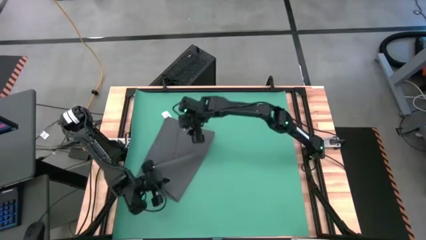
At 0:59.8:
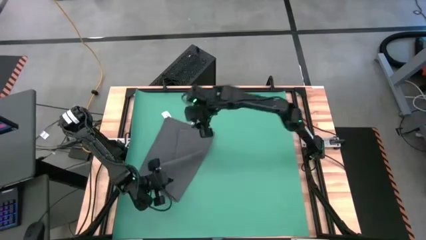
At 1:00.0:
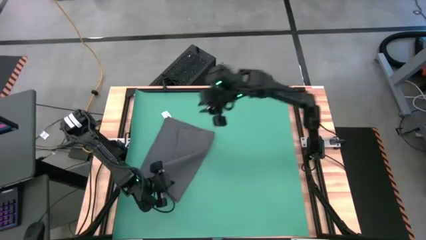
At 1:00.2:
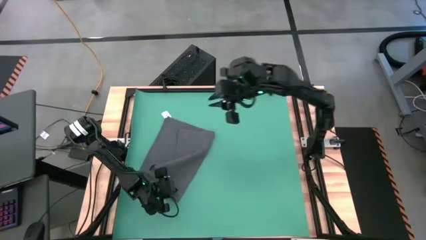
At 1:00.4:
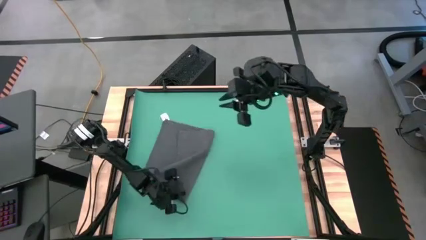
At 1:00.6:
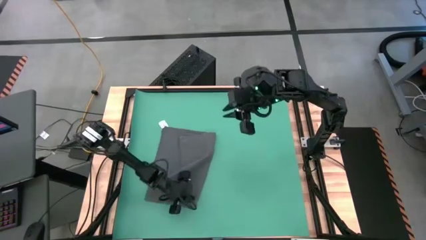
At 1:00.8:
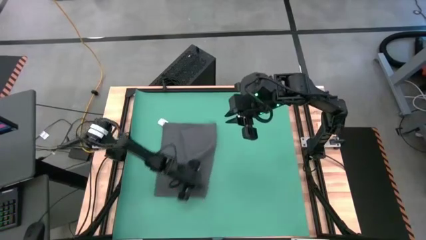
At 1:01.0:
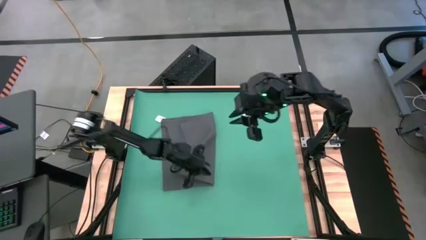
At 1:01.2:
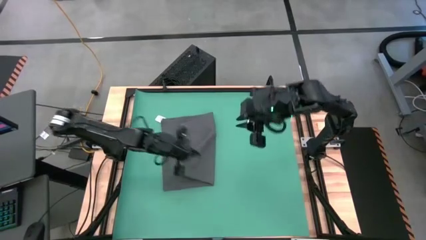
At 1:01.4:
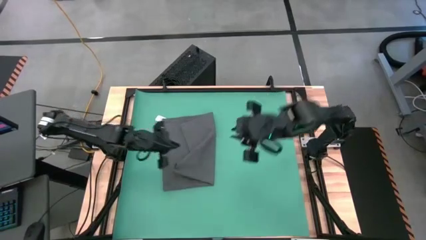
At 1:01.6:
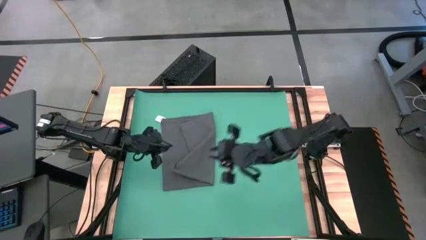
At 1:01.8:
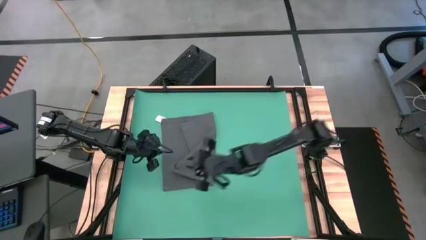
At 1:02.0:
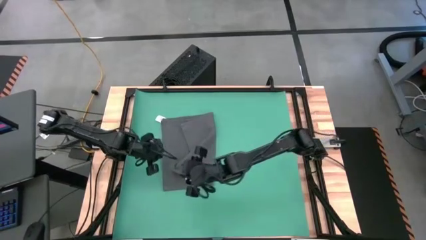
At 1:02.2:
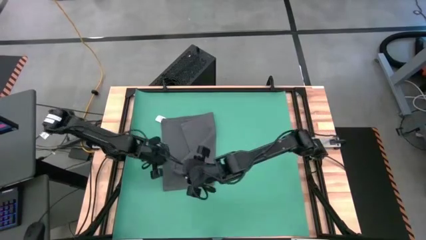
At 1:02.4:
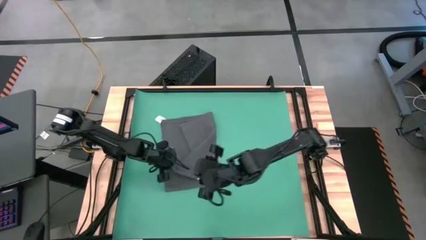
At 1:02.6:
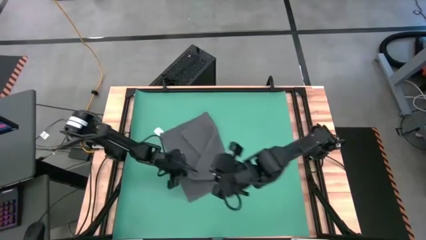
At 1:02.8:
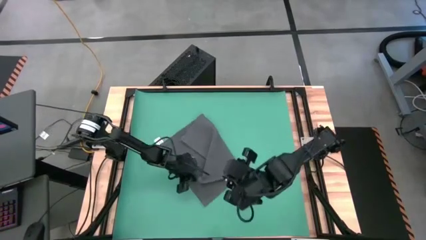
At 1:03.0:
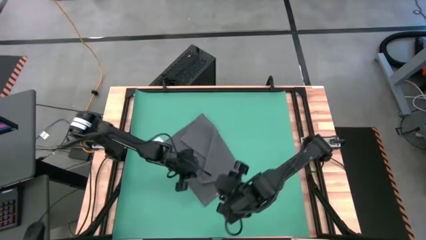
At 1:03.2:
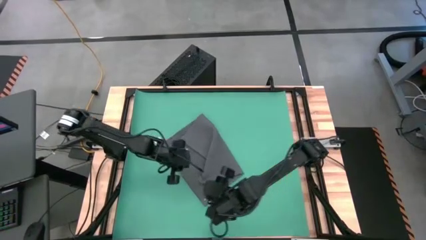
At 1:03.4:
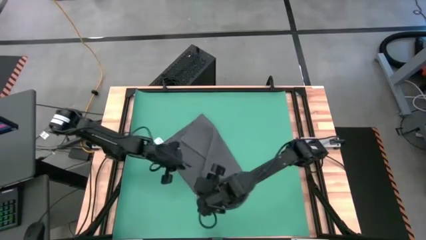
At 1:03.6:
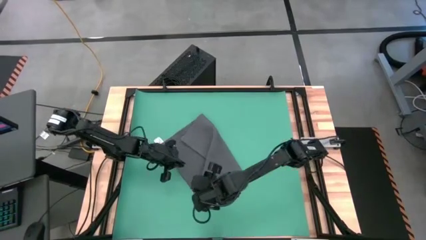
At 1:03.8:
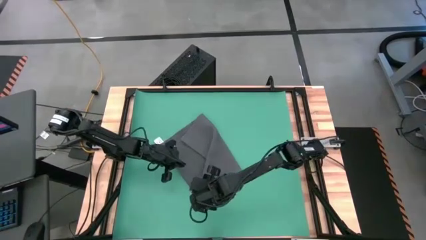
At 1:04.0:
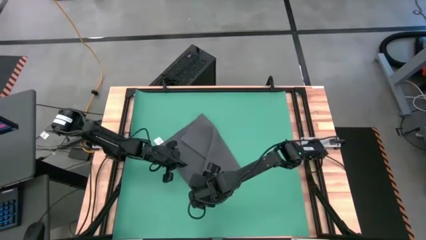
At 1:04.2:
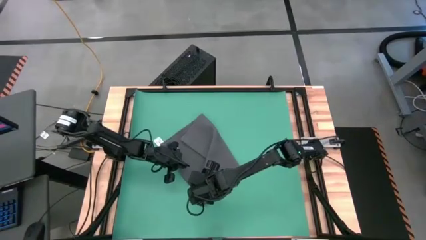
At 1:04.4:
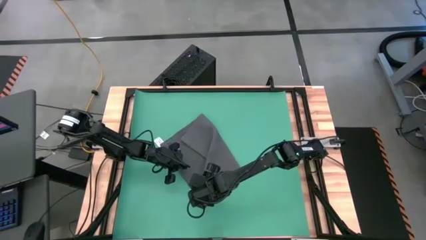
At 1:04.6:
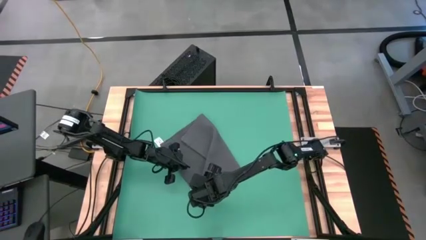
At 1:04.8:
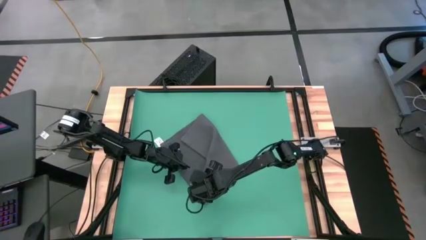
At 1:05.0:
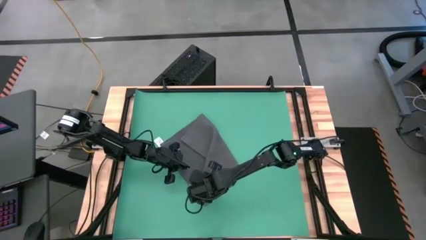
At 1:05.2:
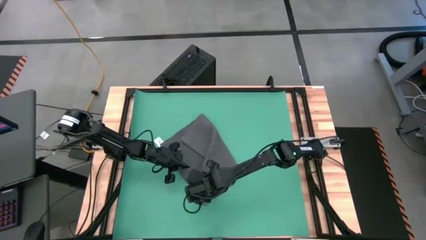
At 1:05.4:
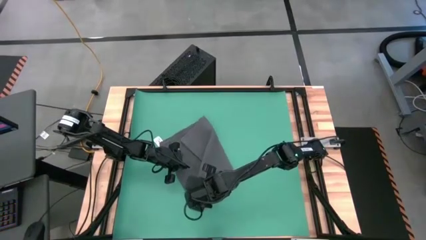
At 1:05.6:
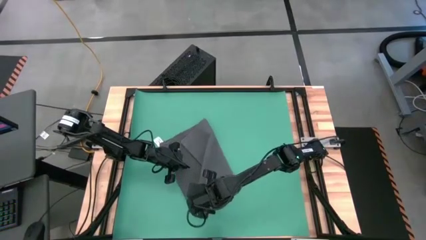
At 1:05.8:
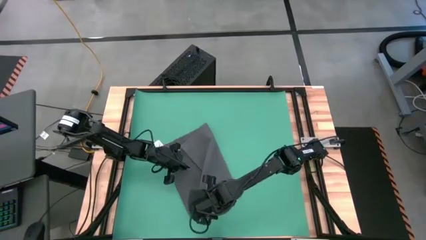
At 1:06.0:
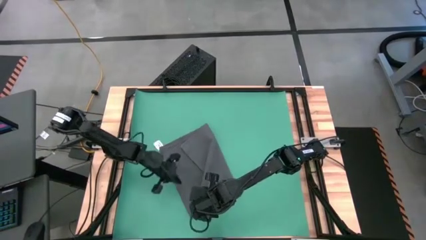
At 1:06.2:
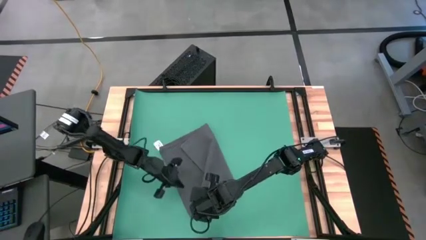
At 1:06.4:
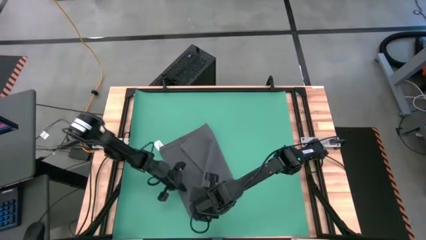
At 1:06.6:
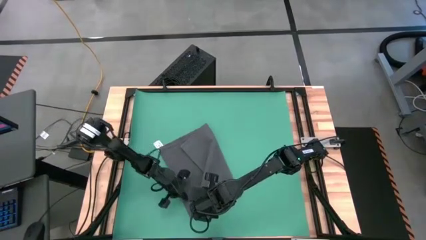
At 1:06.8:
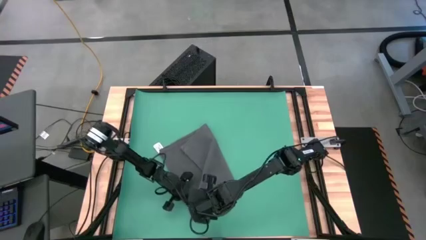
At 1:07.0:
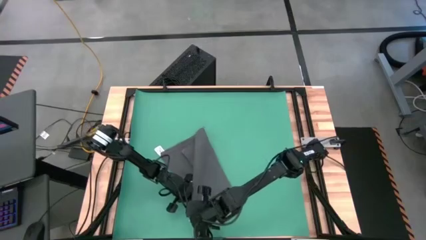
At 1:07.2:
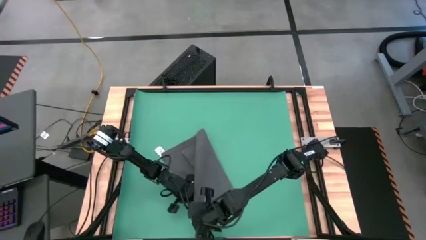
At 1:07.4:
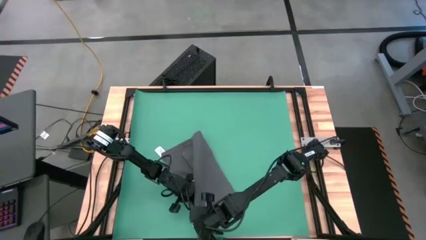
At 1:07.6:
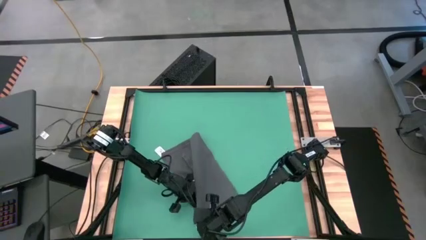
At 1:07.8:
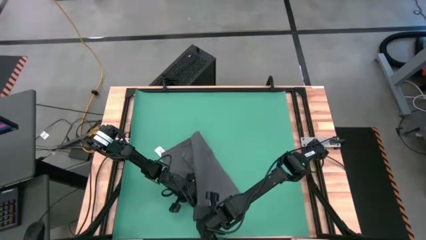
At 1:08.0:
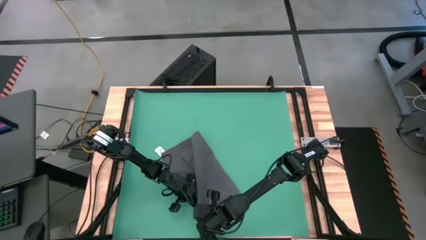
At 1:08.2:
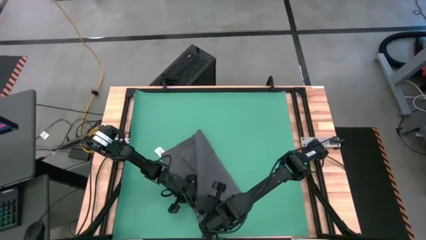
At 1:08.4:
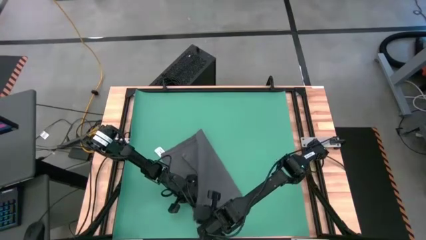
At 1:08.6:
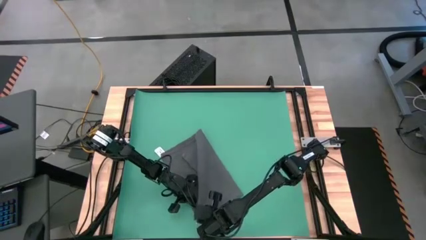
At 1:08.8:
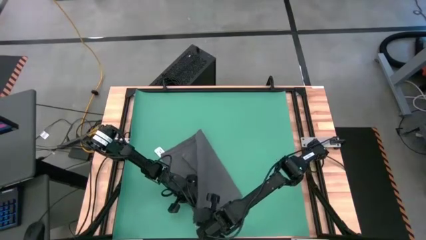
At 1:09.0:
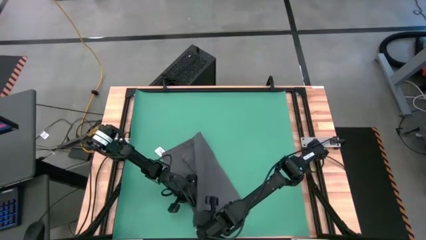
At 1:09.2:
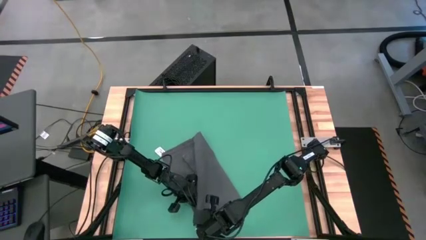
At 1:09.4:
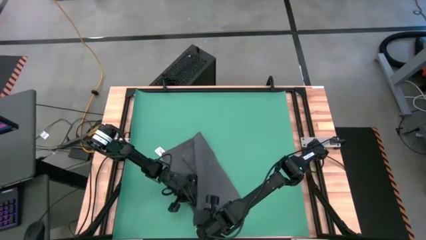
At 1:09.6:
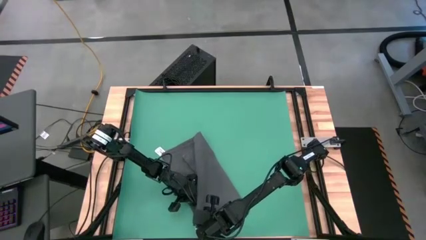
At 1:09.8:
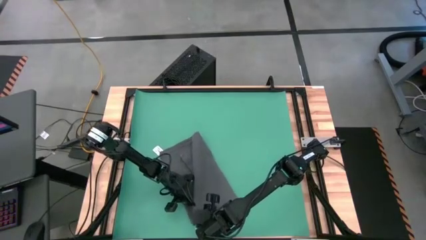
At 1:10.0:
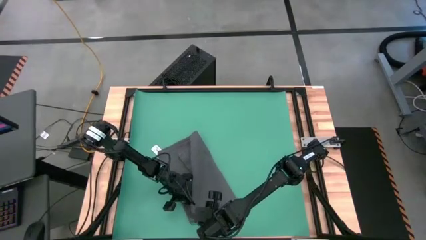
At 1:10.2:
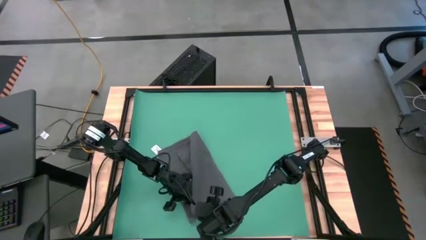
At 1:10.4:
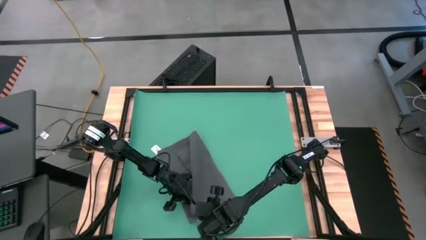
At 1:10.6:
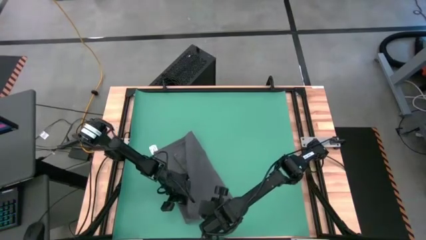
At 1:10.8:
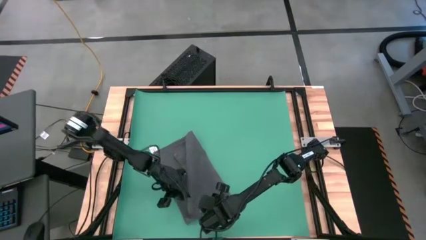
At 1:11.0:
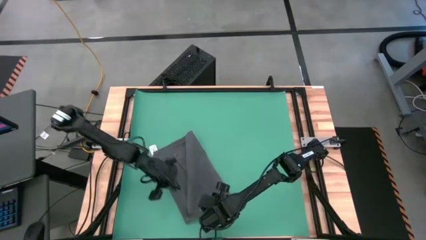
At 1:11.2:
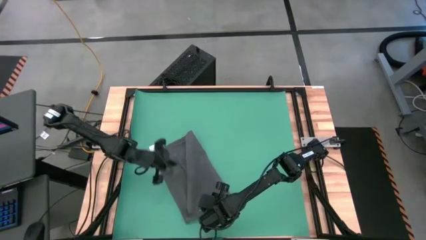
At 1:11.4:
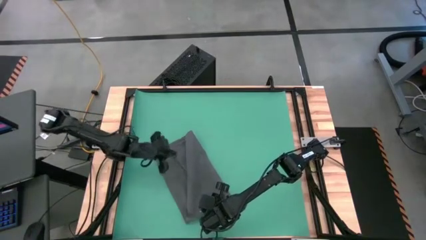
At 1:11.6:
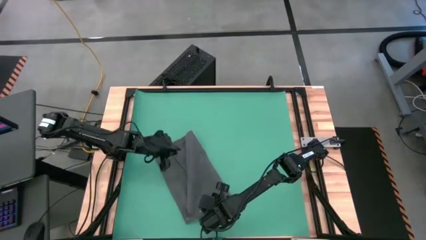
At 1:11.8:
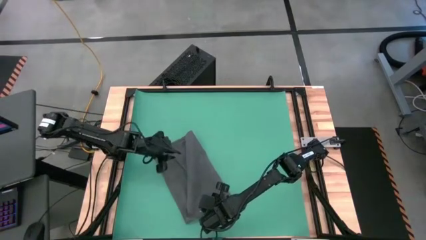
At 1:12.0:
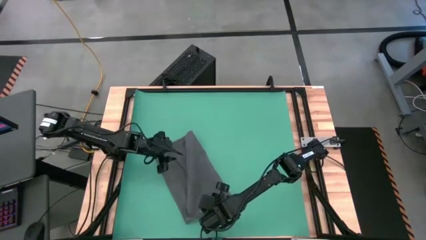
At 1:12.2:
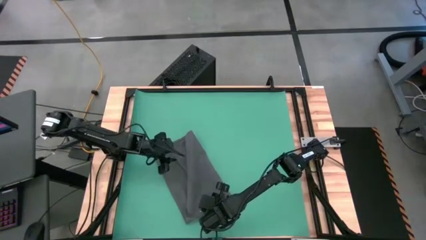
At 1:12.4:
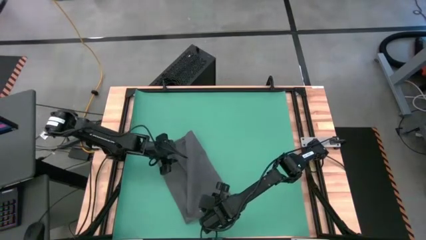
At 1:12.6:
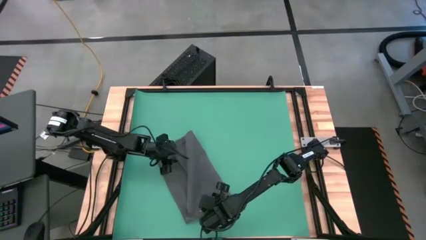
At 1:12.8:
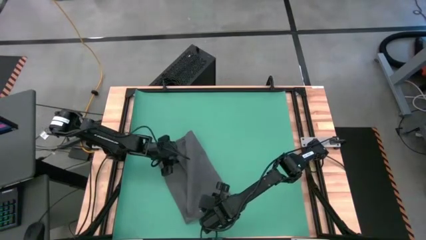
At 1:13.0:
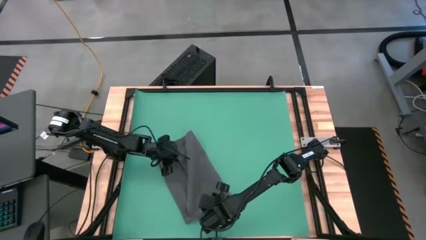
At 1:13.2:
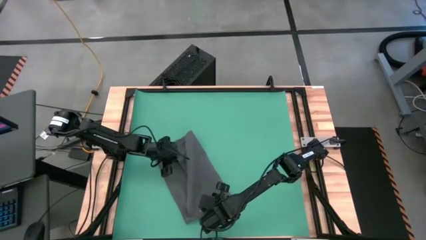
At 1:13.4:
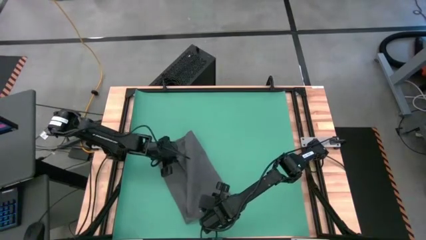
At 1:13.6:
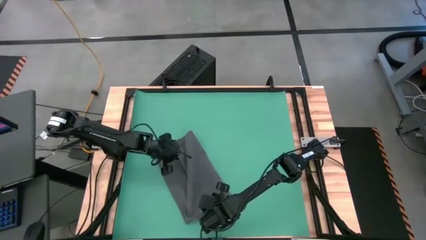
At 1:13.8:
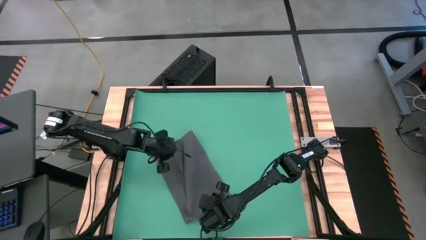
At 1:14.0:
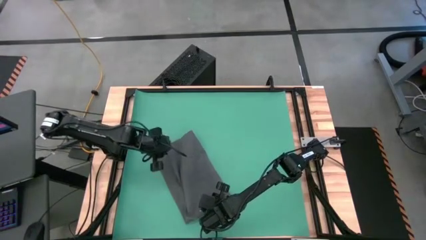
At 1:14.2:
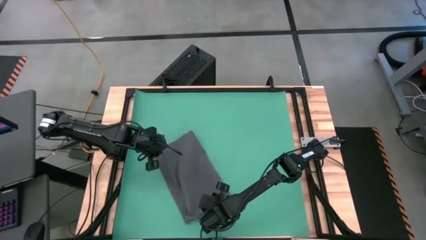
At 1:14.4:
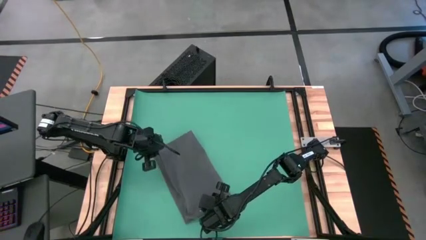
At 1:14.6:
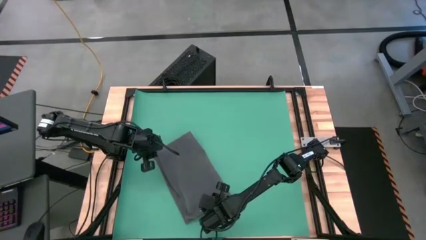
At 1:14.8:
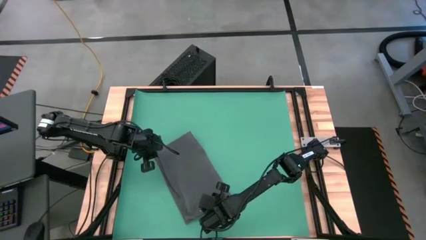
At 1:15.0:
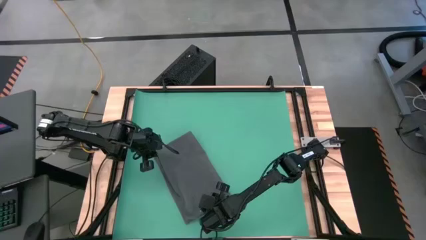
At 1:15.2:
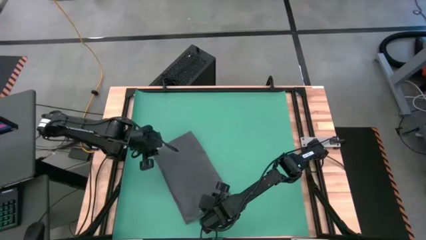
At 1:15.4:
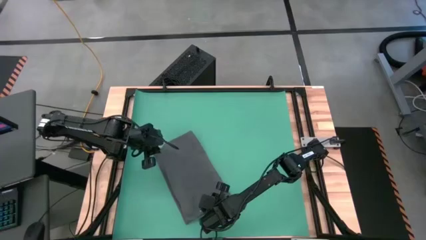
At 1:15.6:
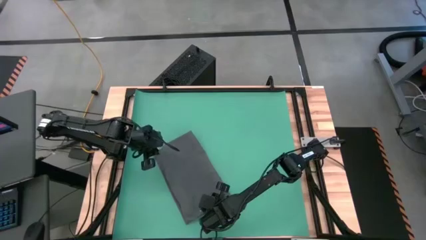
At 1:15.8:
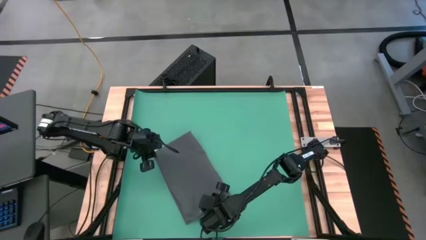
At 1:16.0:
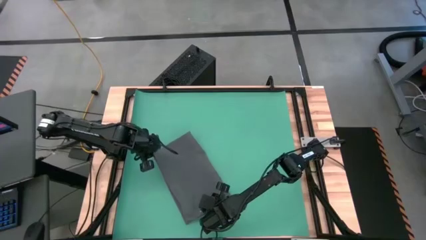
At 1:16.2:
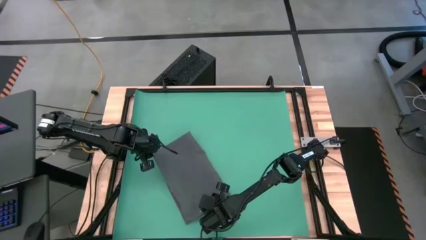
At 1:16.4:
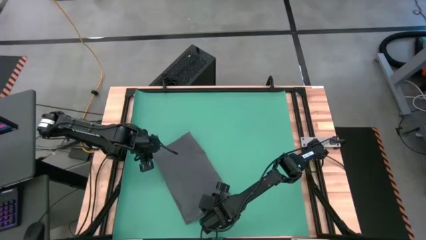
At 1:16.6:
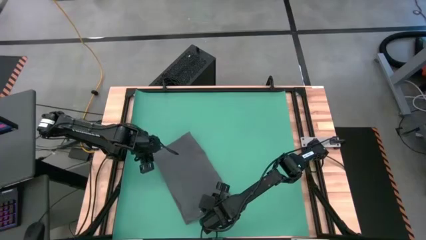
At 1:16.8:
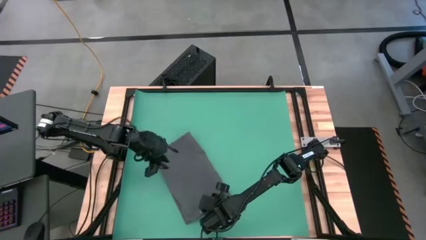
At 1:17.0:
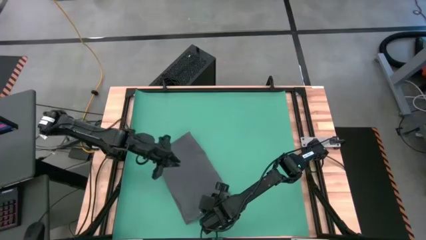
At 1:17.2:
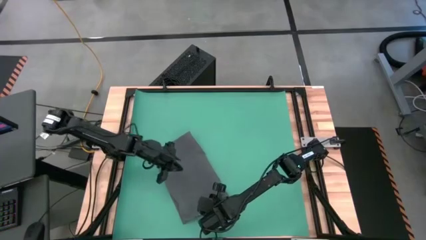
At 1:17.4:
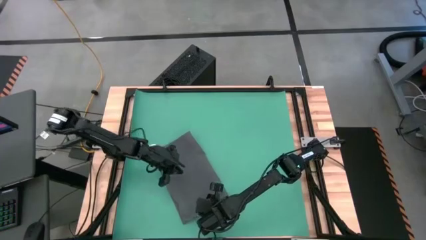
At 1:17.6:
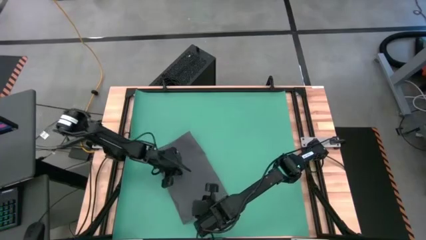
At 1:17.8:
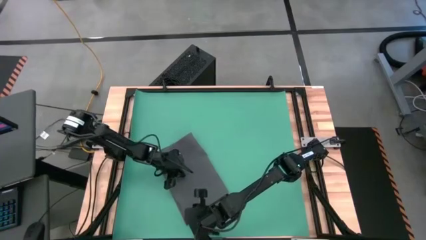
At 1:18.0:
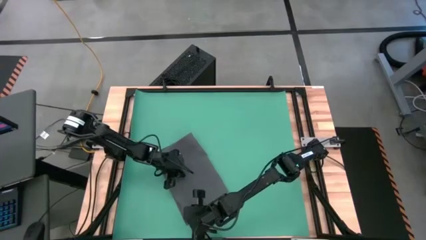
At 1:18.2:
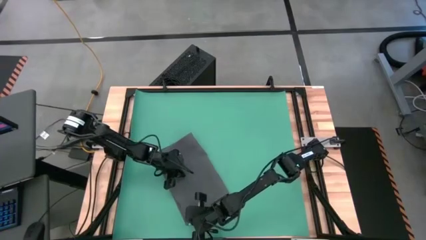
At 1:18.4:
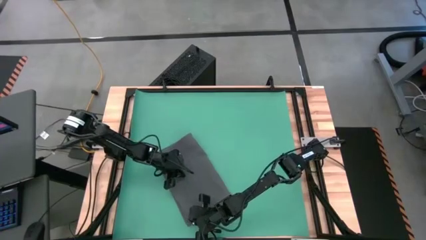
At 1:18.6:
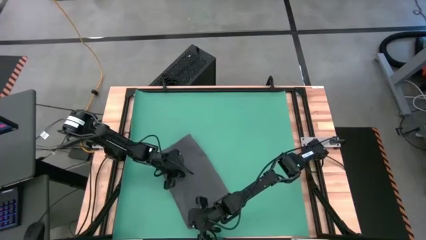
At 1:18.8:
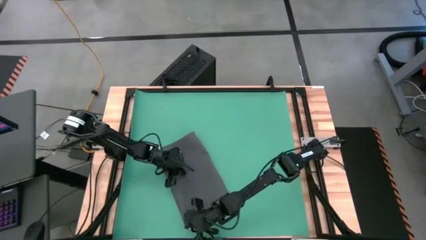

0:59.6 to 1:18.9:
Task: Roll towel
Fold the gray towel
